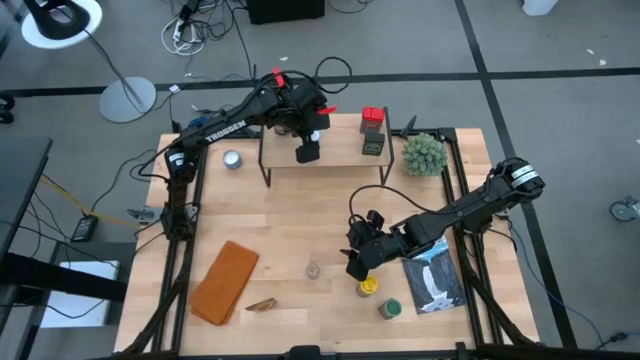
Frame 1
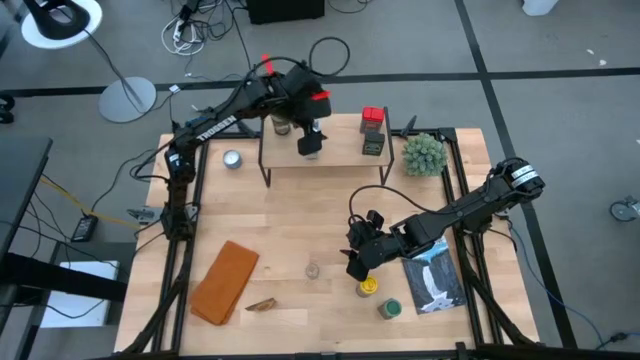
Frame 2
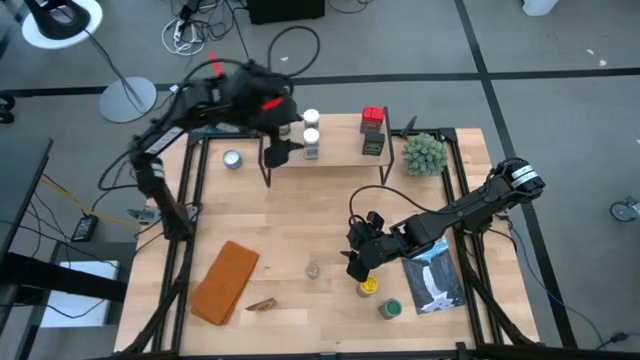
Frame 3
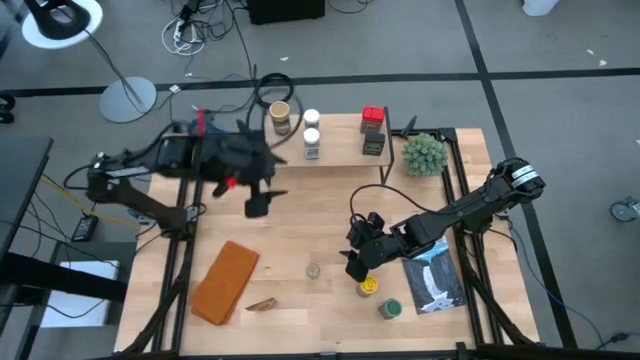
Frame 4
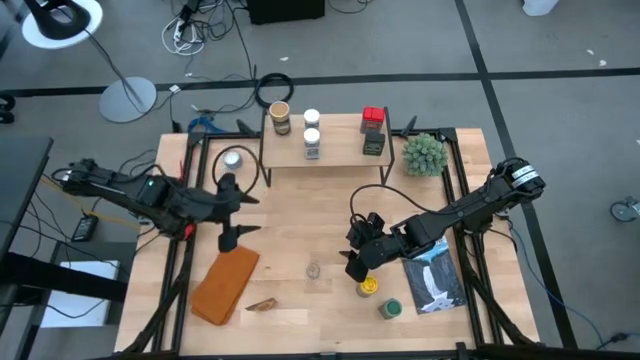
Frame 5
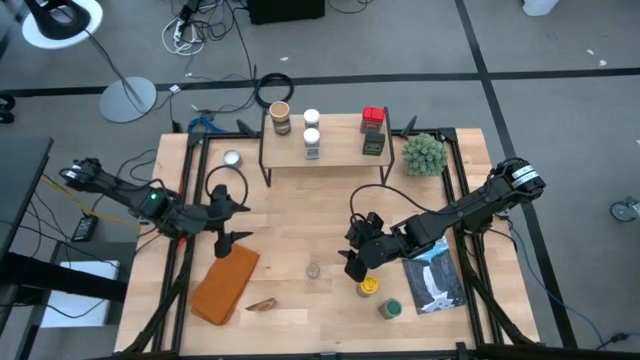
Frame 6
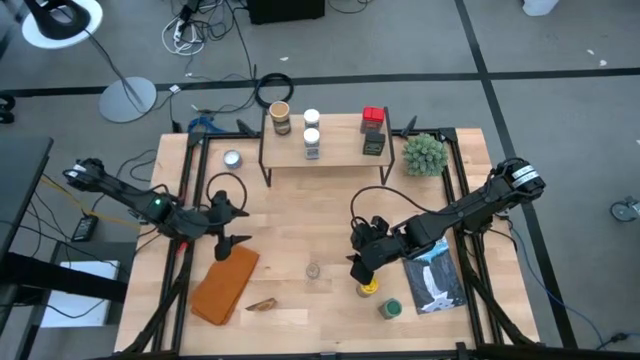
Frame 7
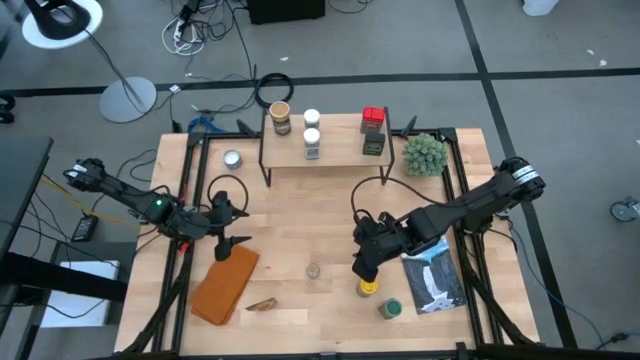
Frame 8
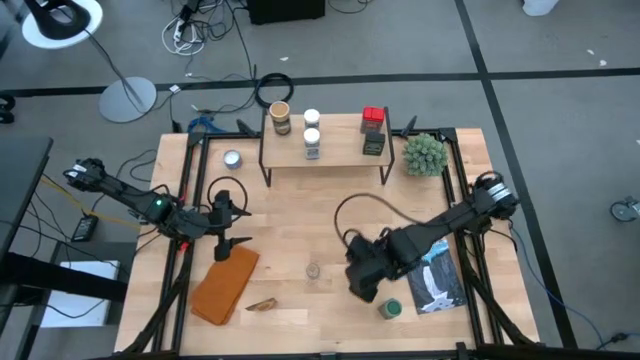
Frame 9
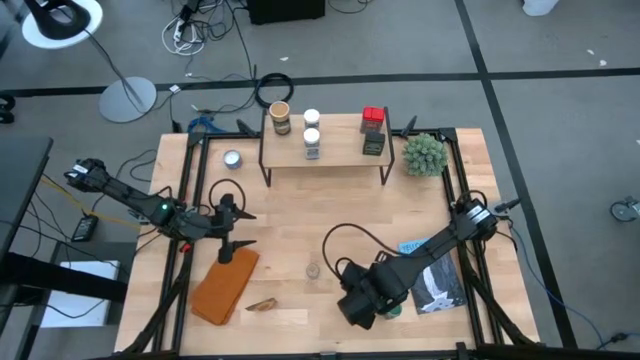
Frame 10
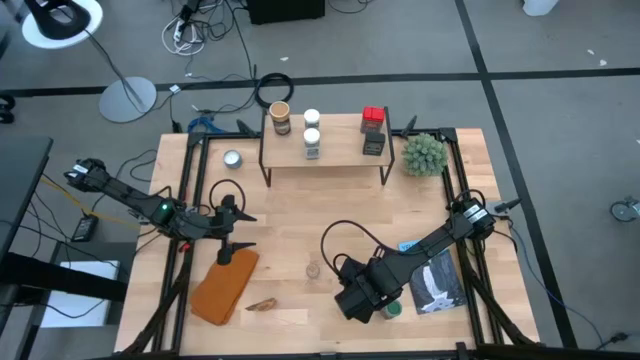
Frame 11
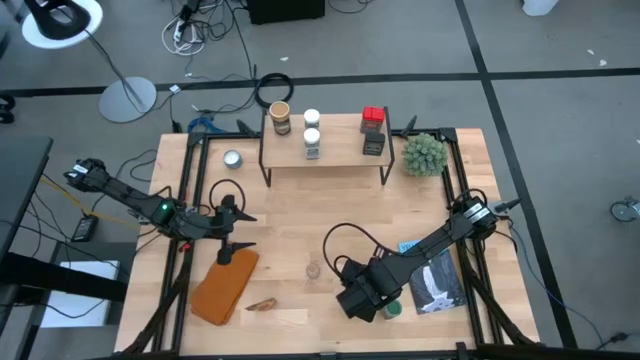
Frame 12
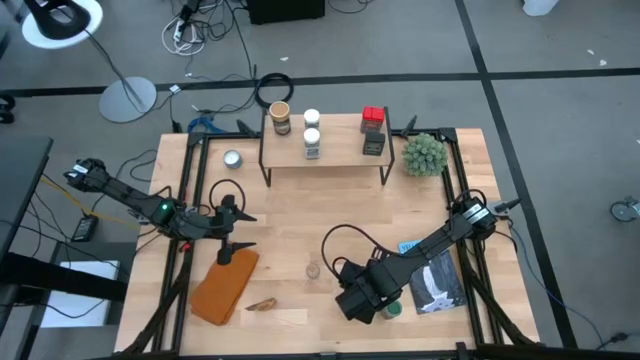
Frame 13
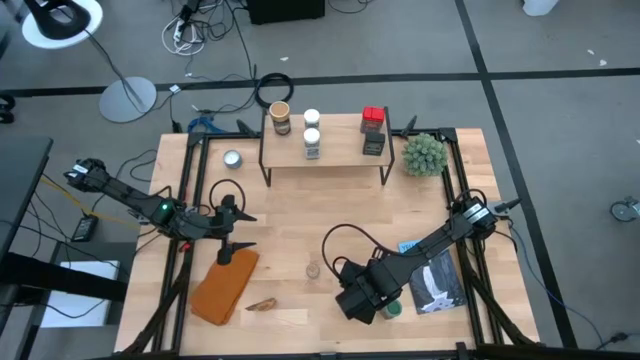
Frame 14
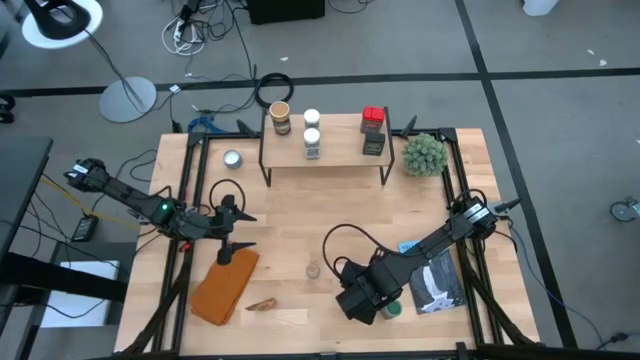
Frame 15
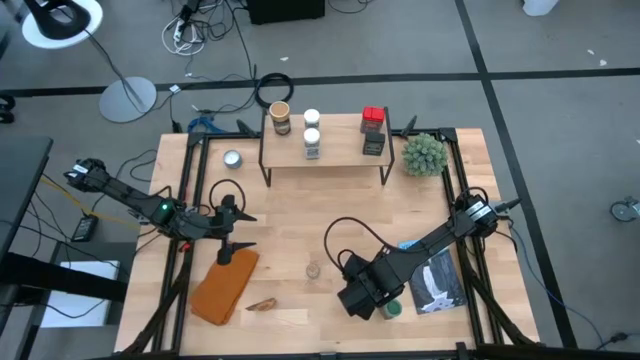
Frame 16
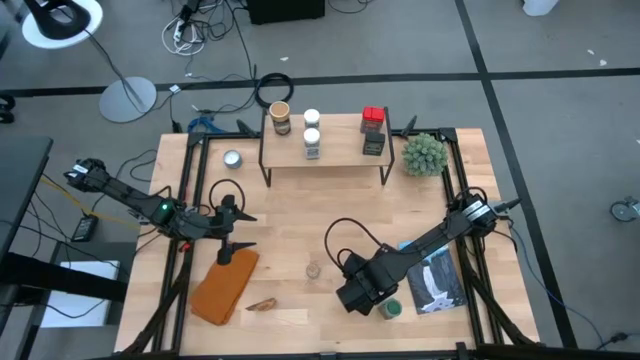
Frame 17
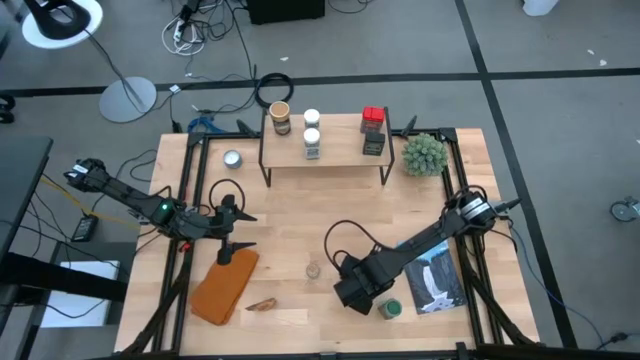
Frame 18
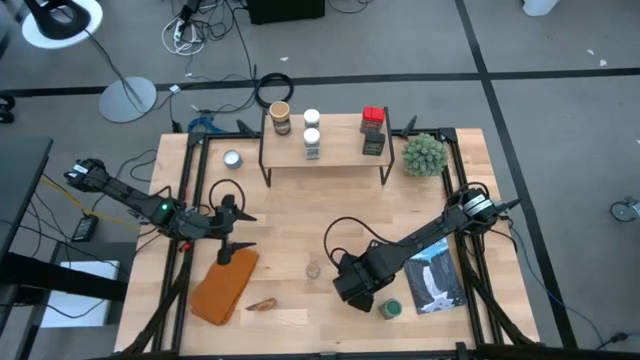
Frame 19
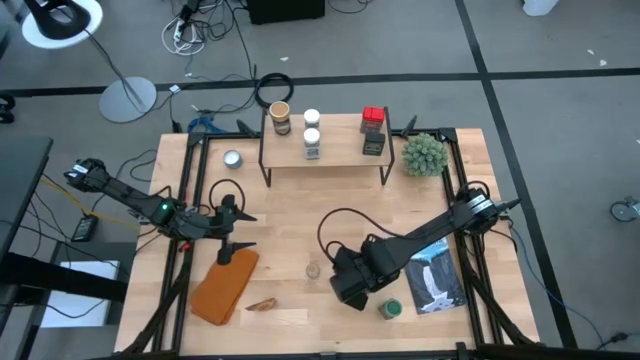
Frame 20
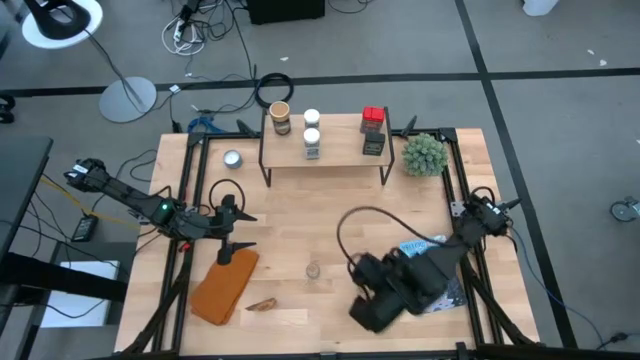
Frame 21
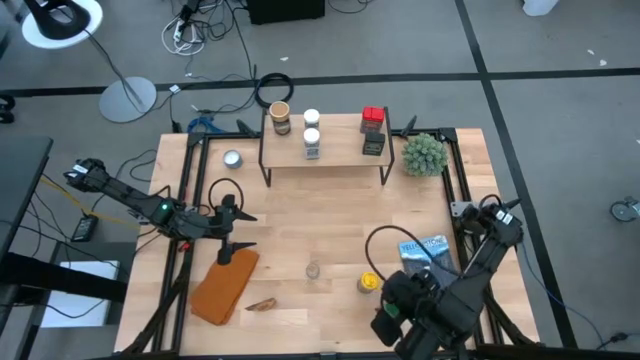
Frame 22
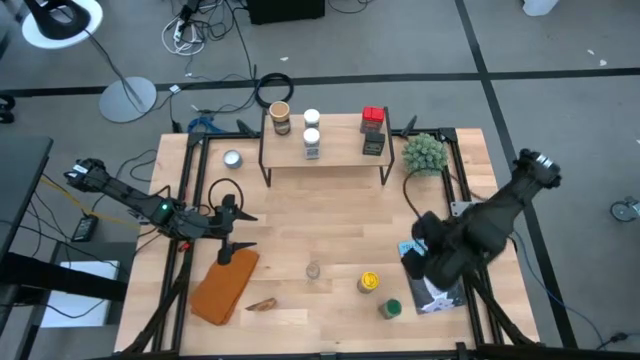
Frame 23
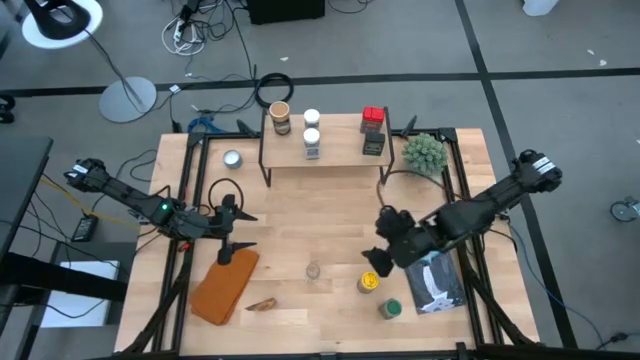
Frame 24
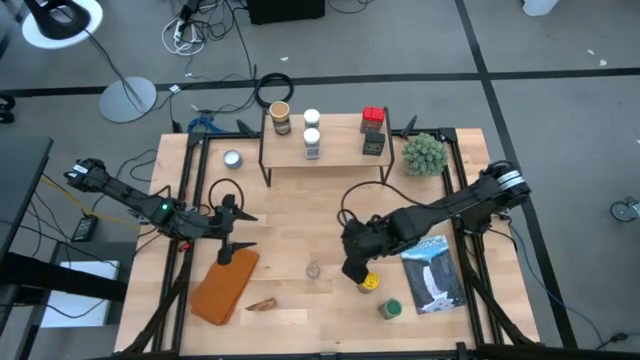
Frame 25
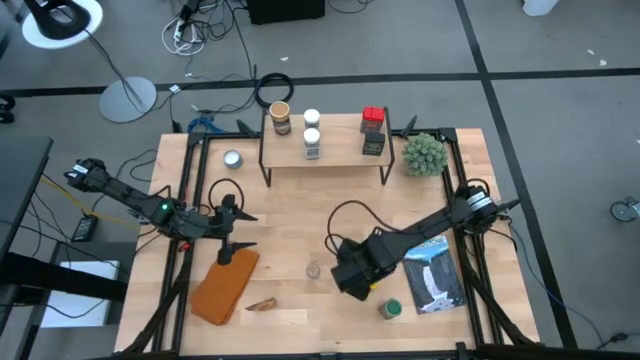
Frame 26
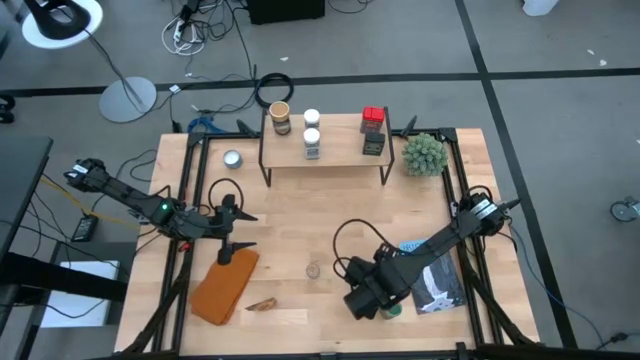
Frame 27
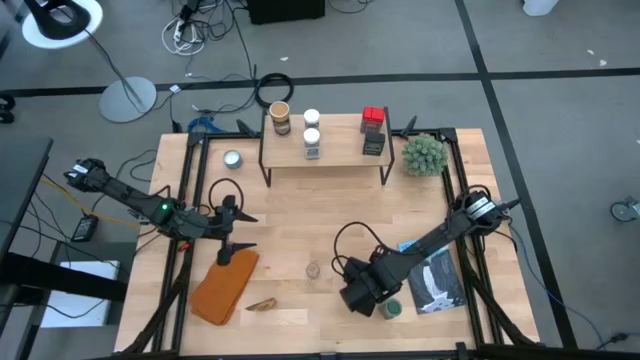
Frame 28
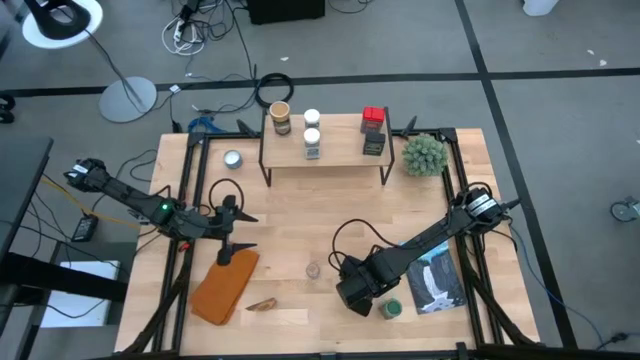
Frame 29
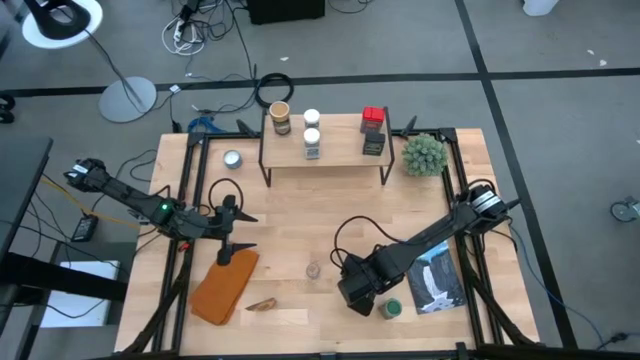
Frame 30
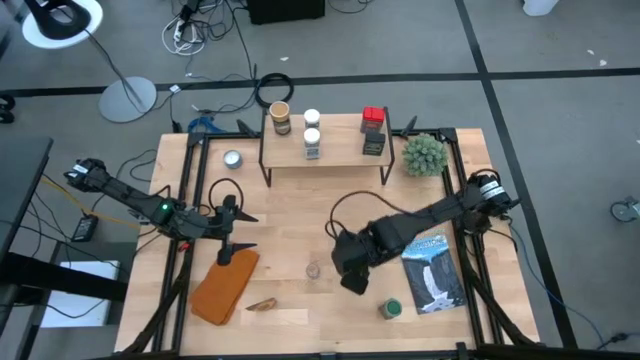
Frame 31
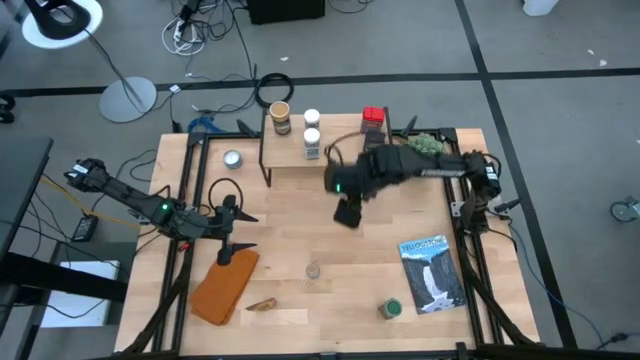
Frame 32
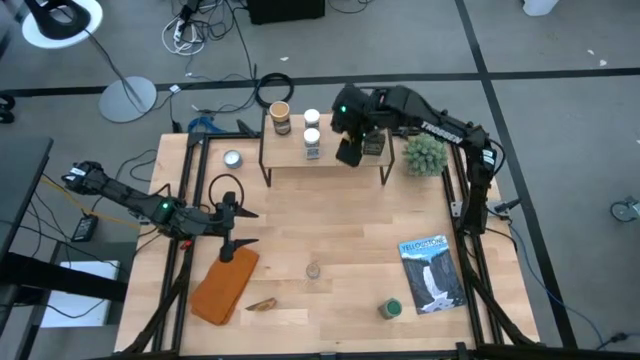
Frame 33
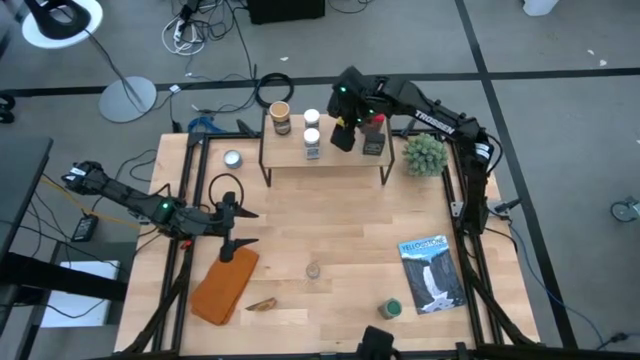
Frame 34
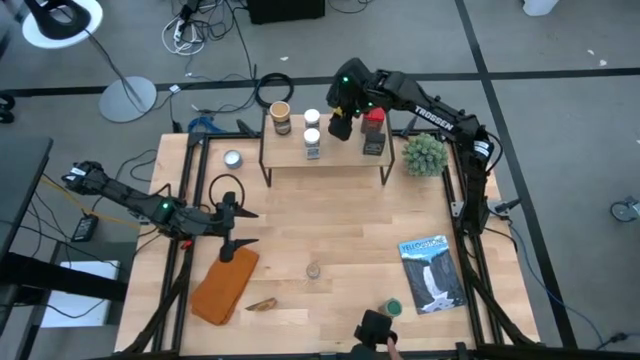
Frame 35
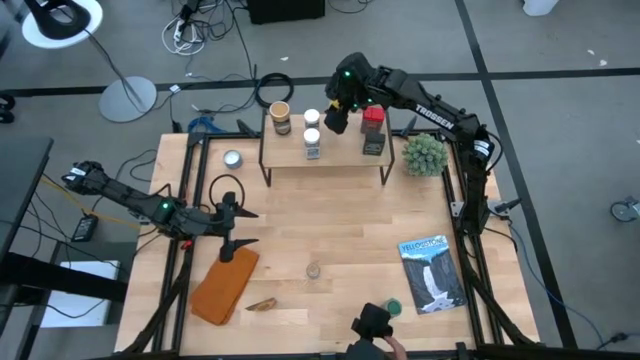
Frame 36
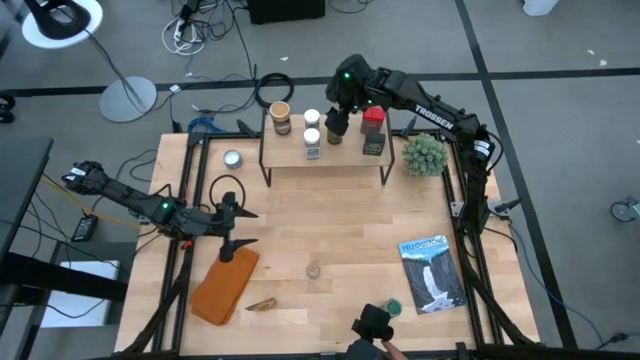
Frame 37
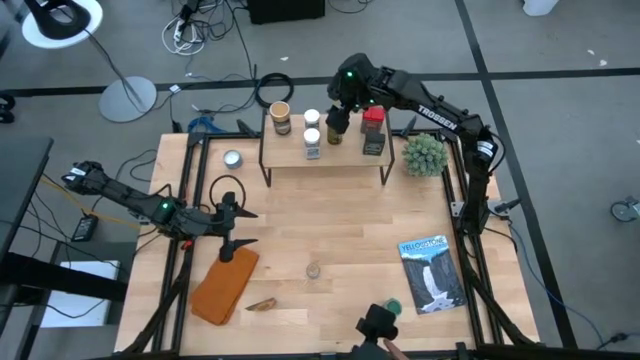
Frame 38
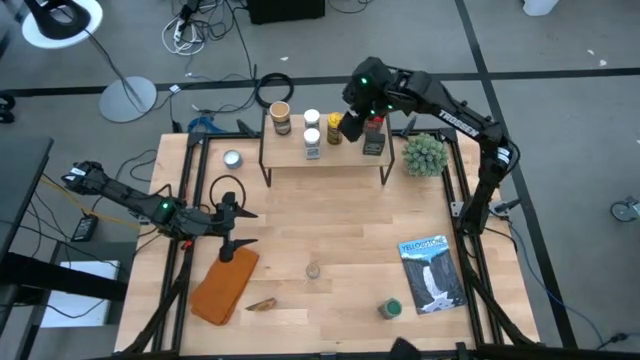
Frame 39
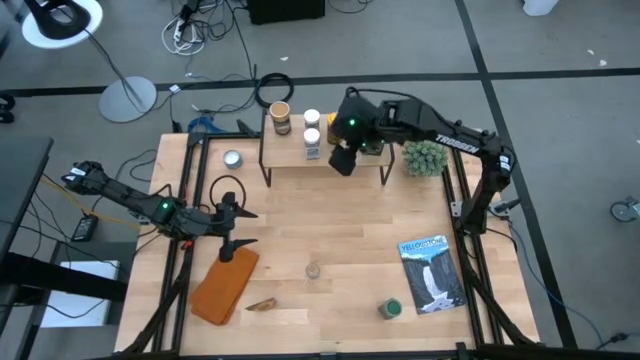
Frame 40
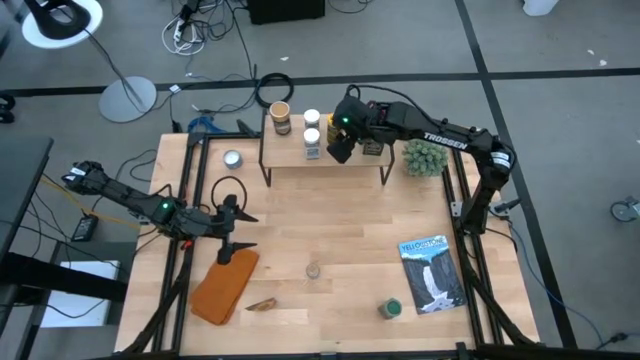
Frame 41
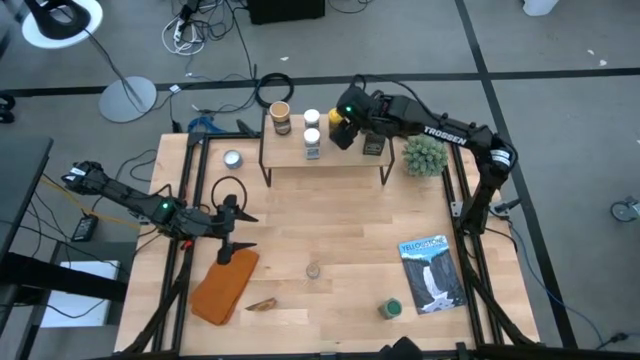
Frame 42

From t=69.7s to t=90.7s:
Task: Shelf spices
Put the yellow seasoning bottle on the shelf

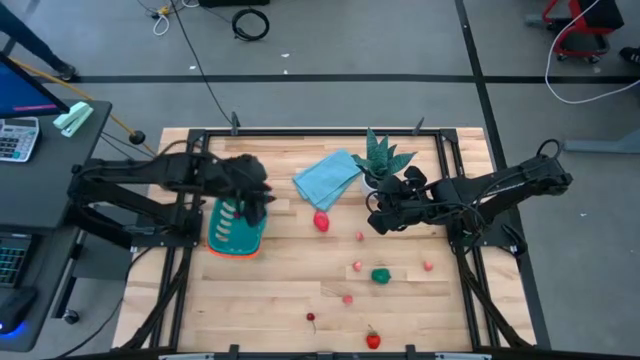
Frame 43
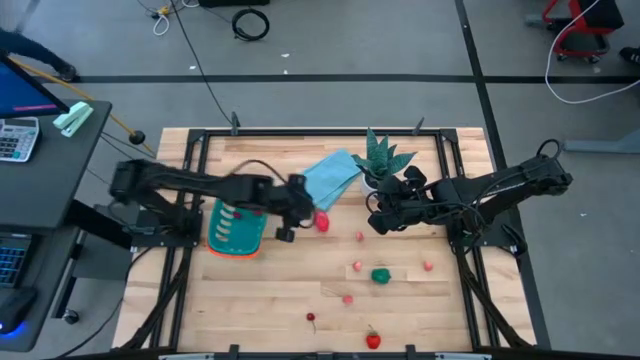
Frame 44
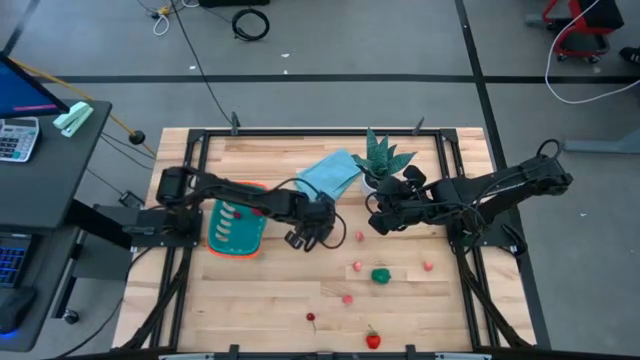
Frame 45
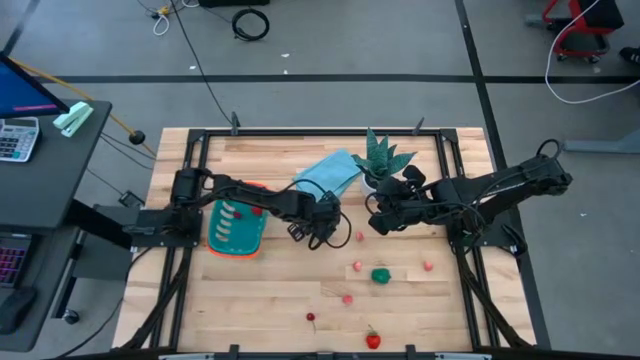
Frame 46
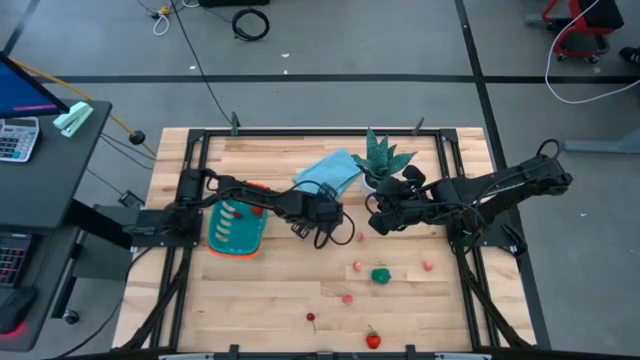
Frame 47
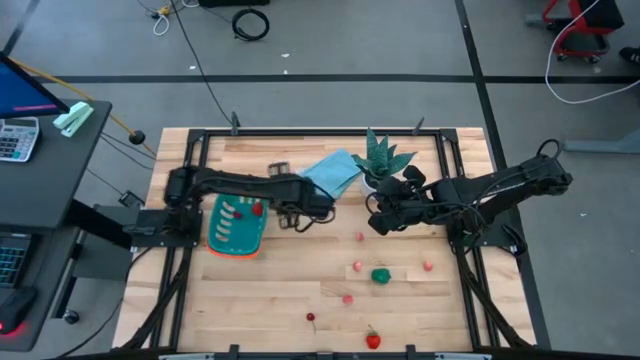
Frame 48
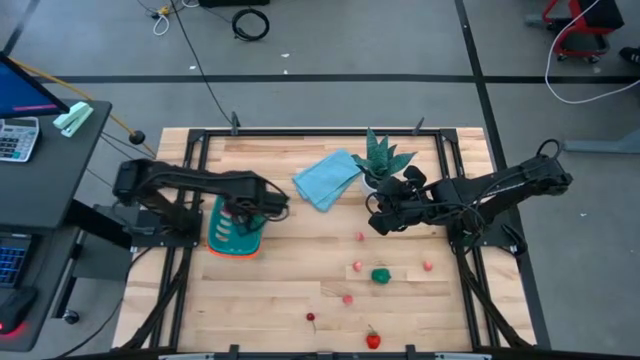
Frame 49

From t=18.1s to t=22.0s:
Task: Pick and placing Produce into tupperware
Put the dragonfruit into the blue basket
